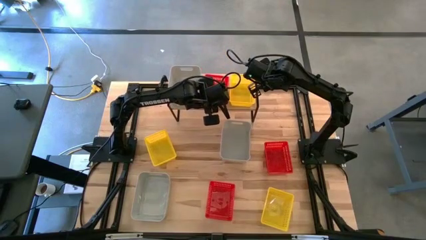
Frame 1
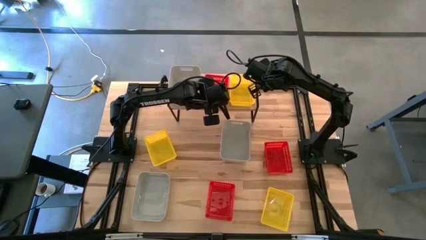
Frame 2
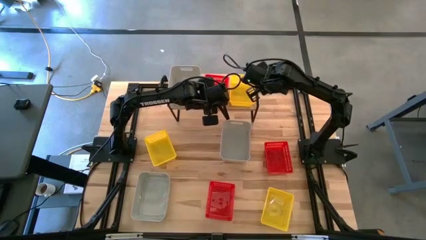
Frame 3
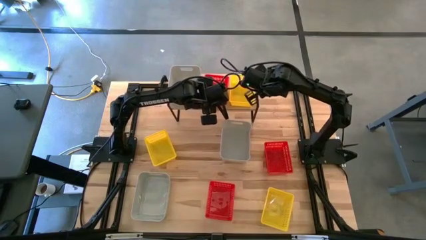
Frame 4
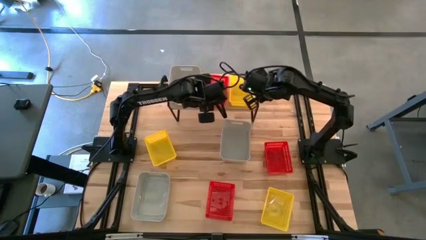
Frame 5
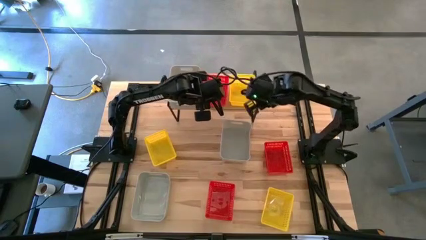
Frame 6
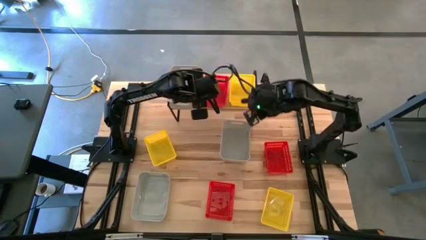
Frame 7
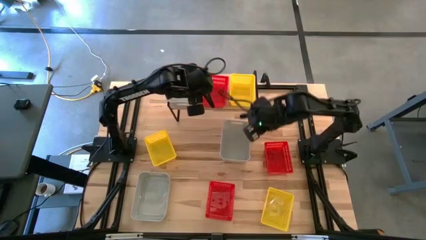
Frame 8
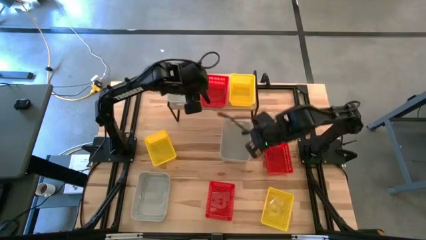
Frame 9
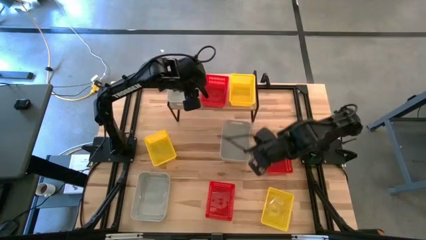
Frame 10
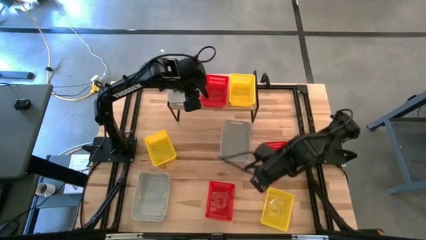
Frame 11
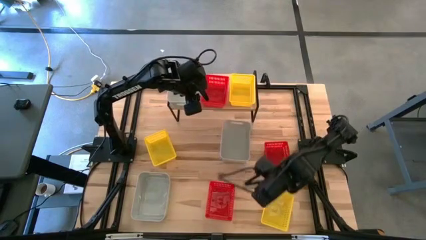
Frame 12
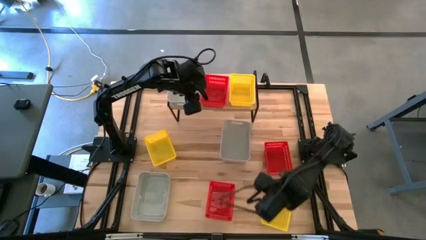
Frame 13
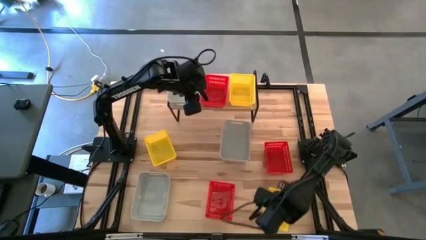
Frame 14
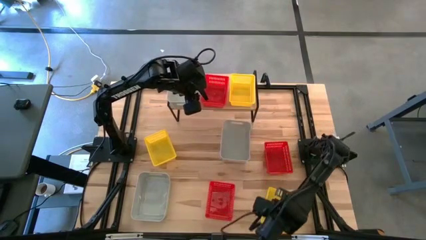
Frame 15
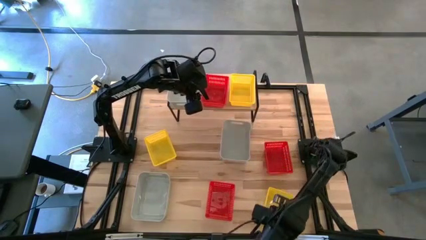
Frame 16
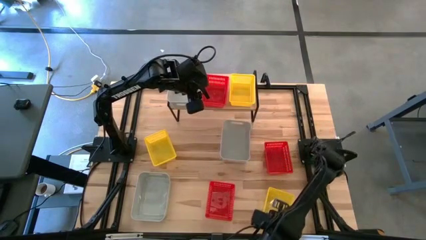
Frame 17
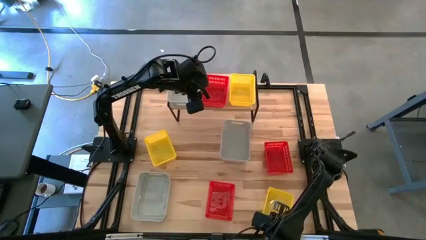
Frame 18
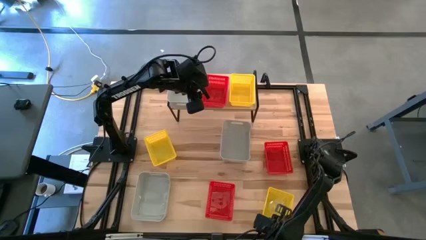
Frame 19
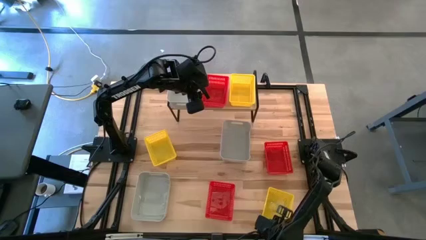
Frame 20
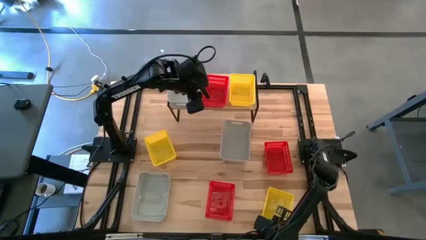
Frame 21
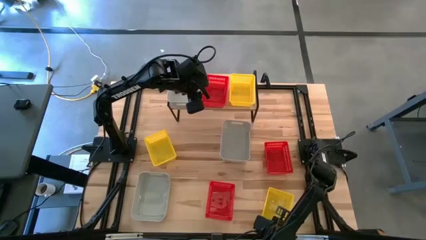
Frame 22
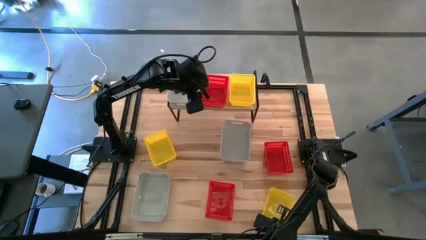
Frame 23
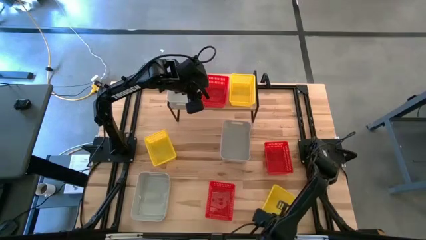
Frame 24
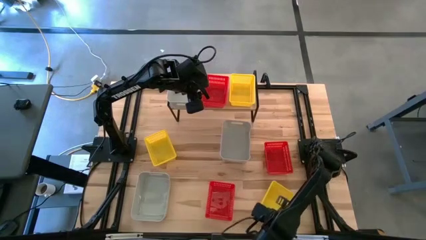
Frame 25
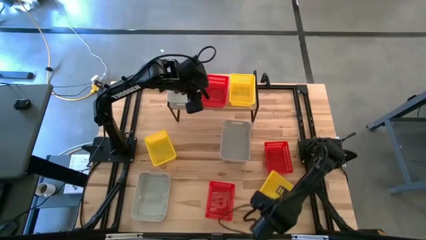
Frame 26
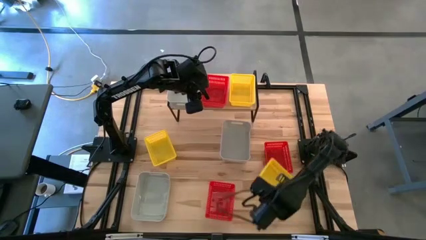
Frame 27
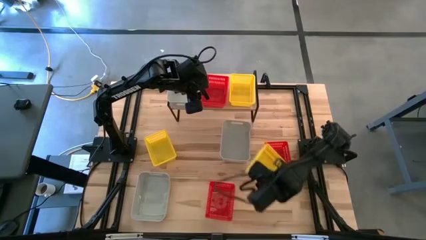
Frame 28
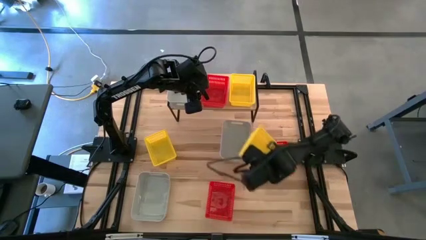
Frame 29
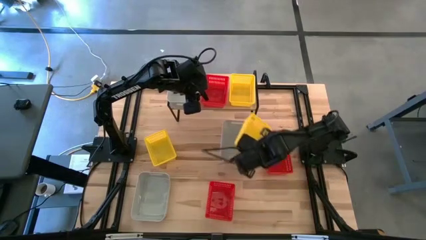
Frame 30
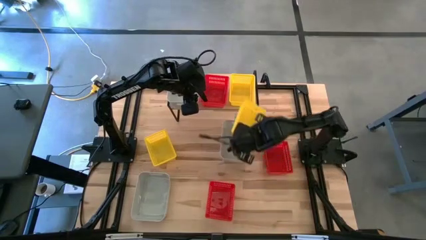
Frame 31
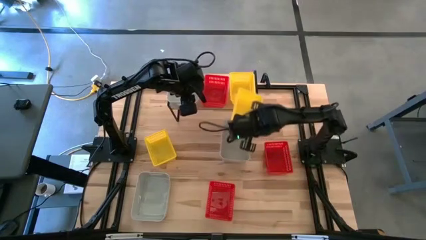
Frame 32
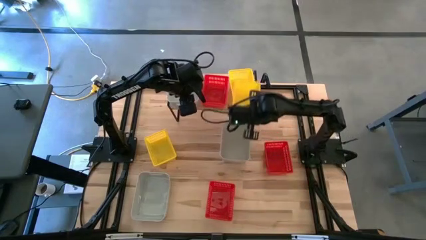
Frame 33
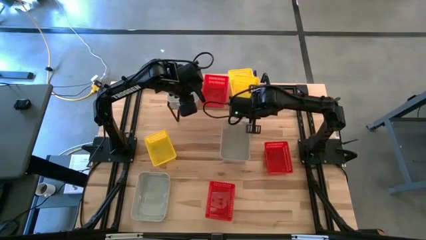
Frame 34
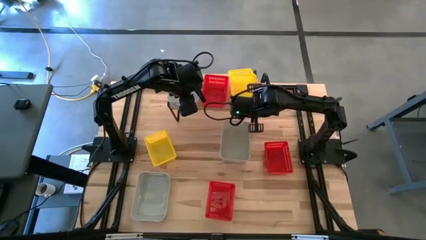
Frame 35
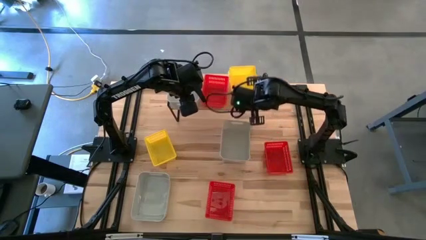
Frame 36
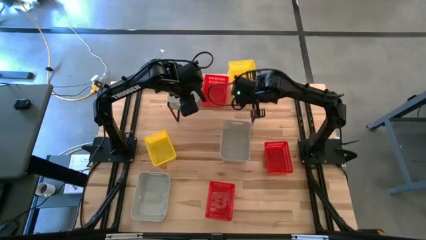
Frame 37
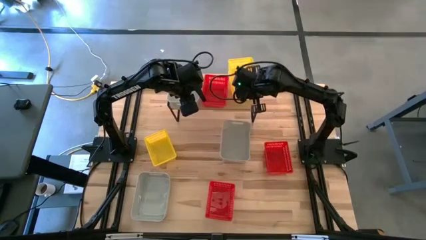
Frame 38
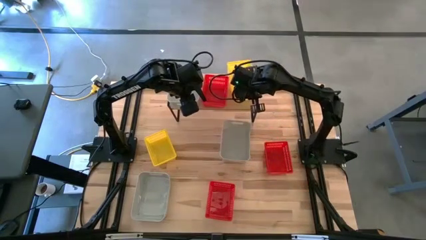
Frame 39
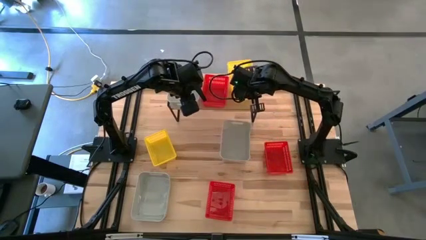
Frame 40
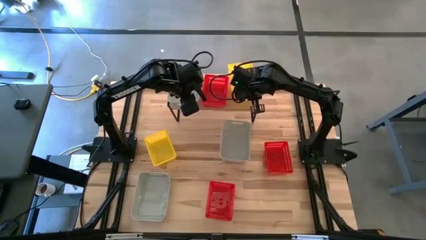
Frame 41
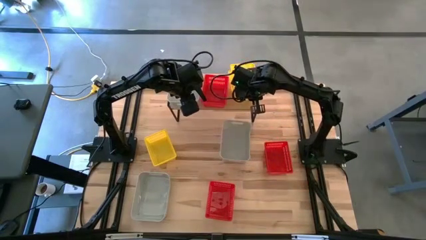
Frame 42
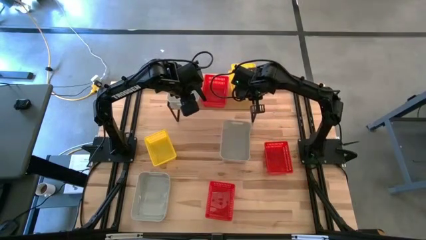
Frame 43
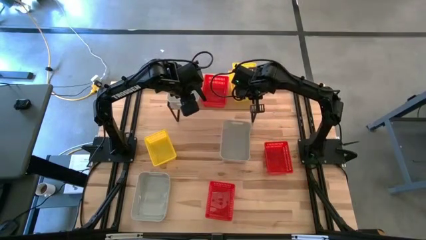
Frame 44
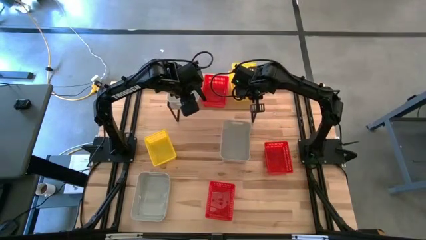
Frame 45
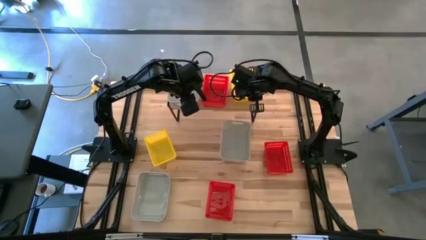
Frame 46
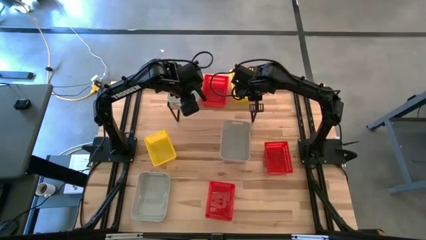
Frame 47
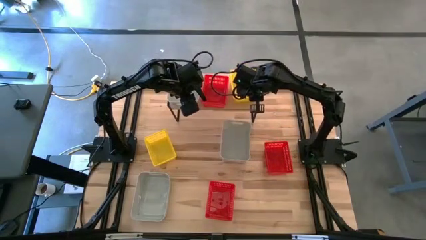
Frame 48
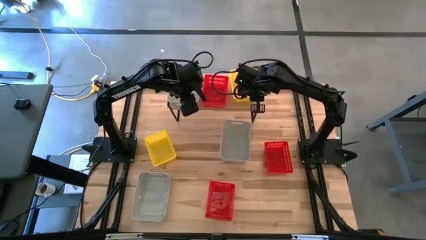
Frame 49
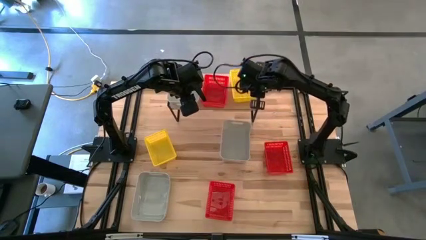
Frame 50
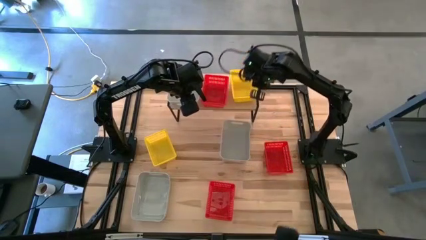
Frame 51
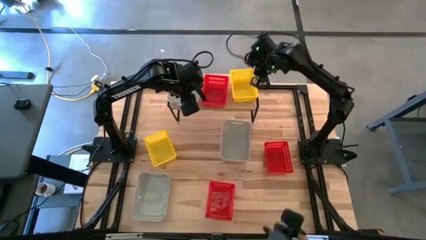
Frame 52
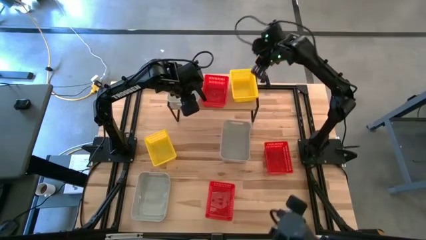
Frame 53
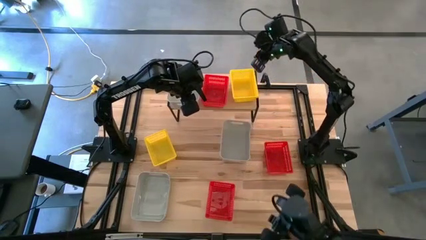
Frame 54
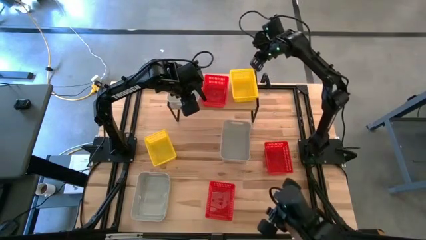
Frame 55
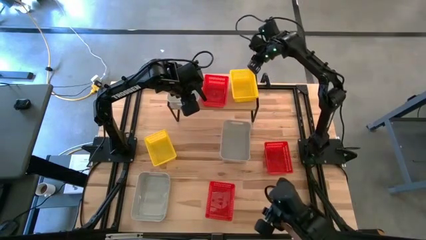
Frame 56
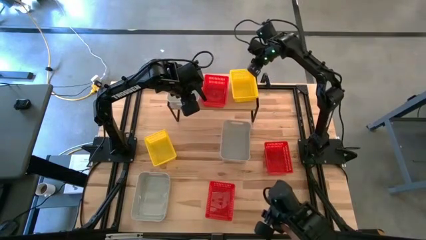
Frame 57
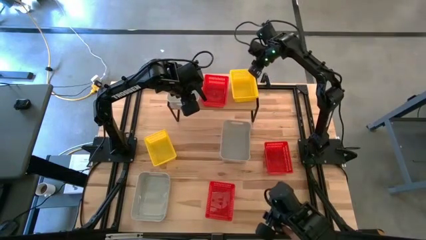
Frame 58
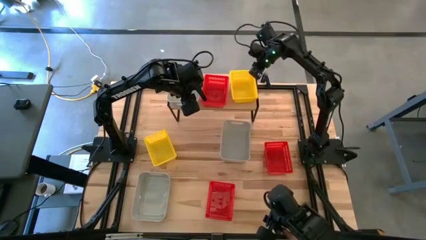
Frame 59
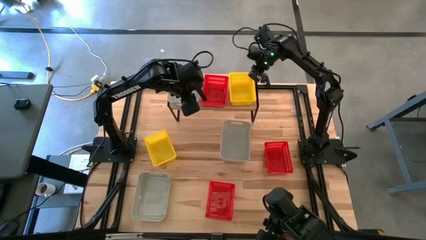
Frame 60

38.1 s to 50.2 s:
Task: Stack baskets on shelf by color
Stack the bottom yellow bin on top of the yellow bin on the shelf

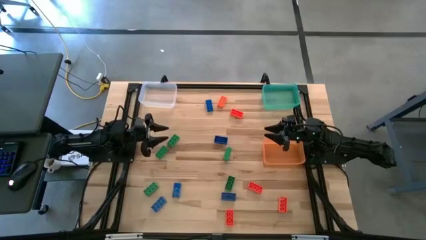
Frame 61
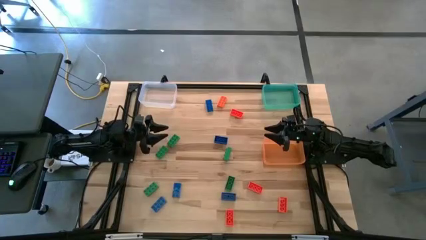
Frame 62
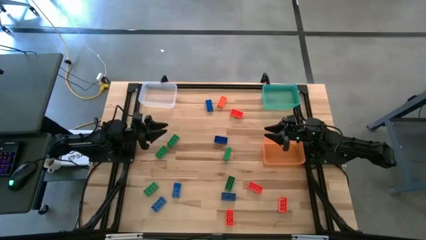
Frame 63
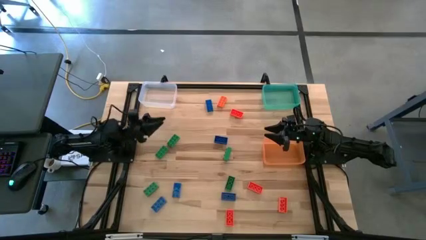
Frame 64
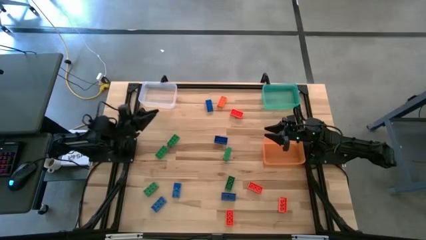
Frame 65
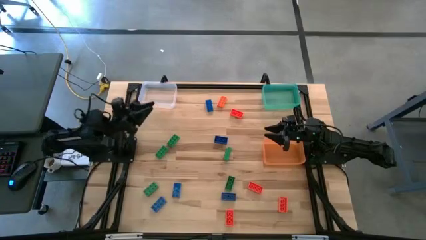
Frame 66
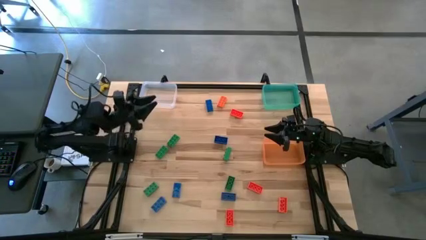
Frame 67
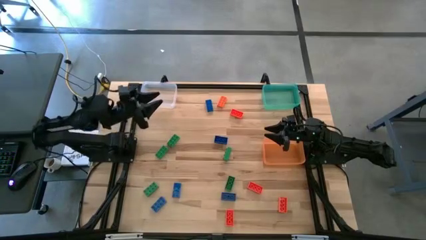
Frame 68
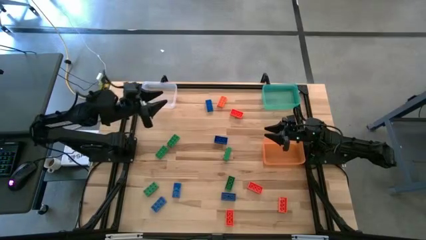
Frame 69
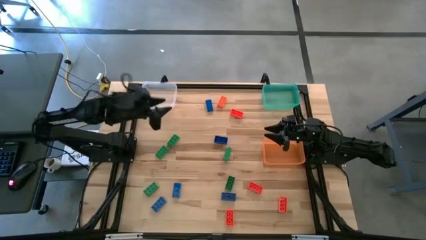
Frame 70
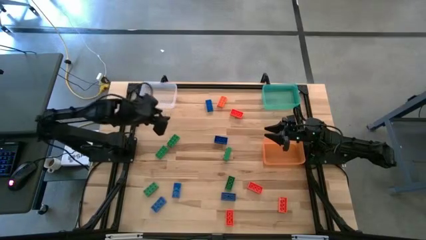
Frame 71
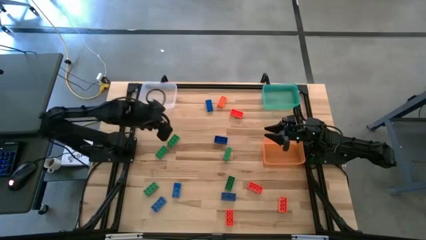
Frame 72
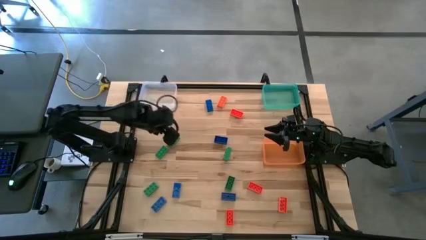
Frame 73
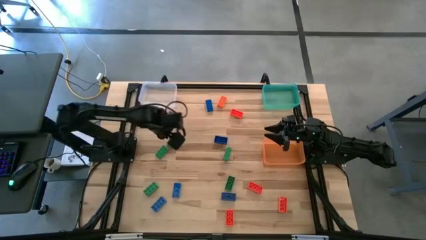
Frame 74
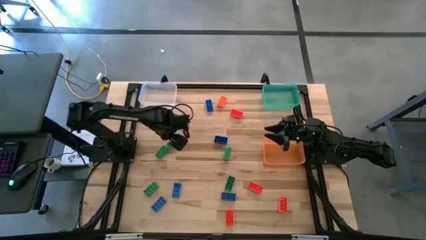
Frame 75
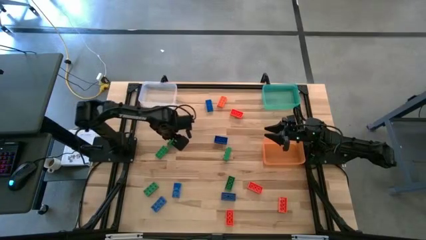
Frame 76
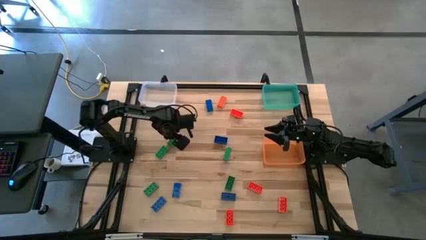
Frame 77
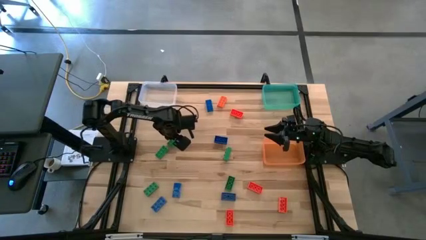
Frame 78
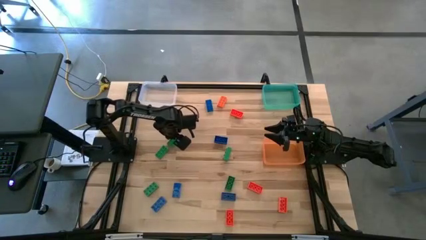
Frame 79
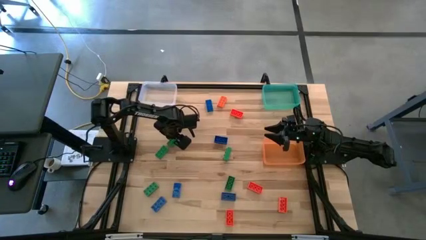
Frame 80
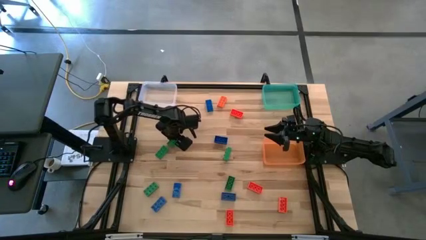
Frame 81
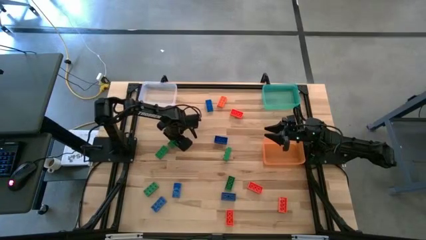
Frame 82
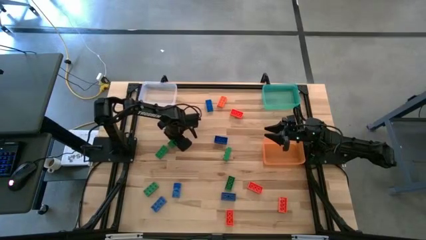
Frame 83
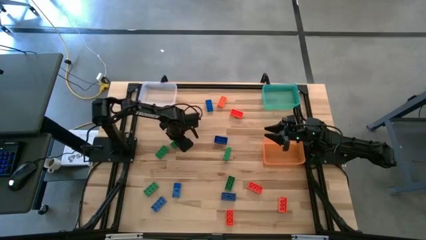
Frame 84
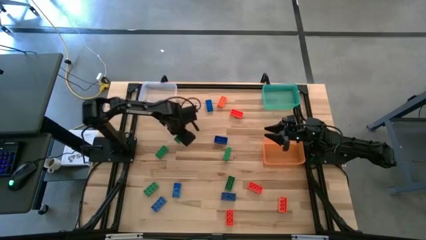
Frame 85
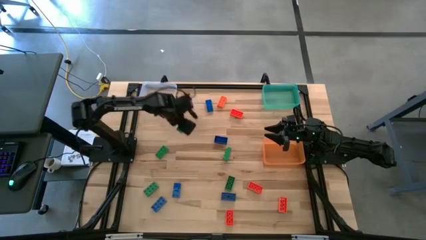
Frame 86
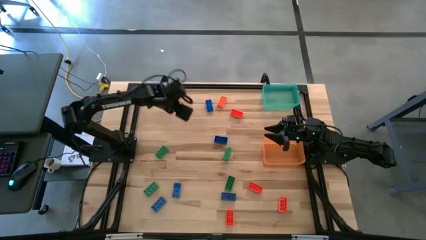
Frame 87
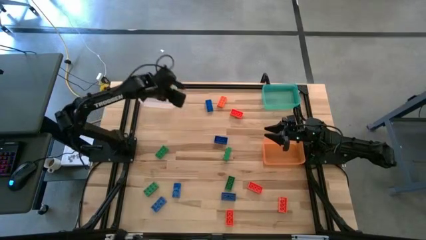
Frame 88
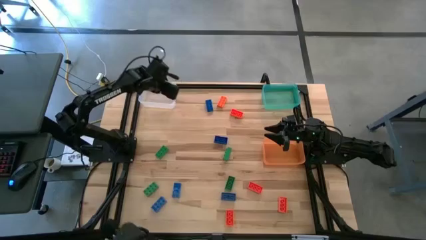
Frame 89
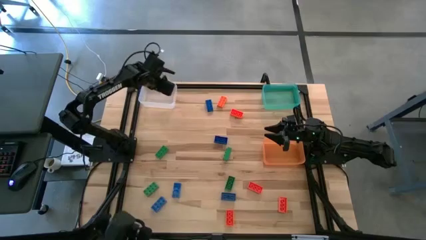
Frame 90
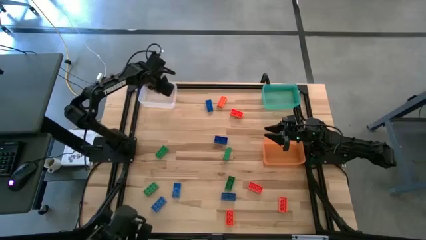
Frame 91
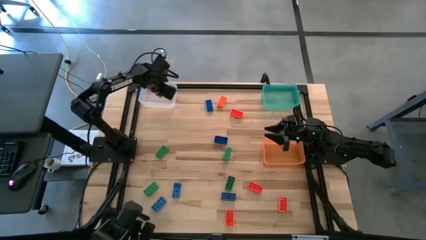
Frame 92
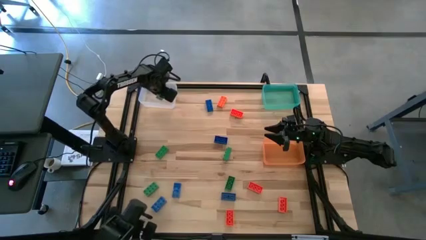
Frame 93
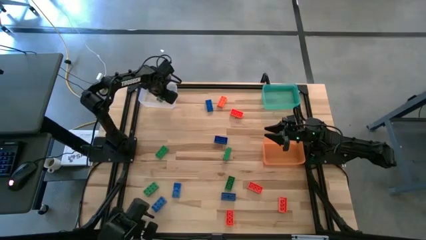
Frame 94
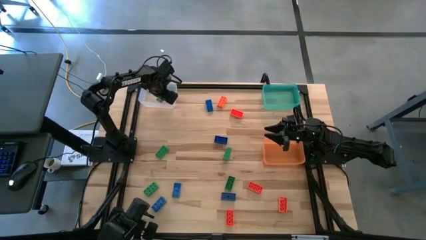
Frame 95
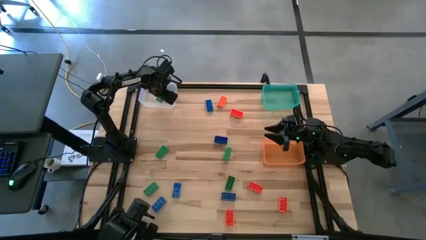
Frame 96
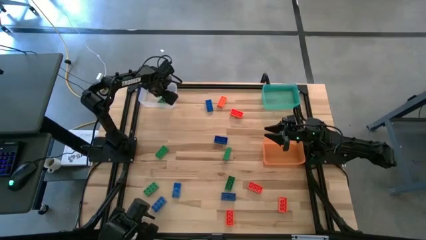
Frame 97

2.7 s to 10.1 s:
Task: Sort & place blocks by color
Put the green game piece into the transparent bin
